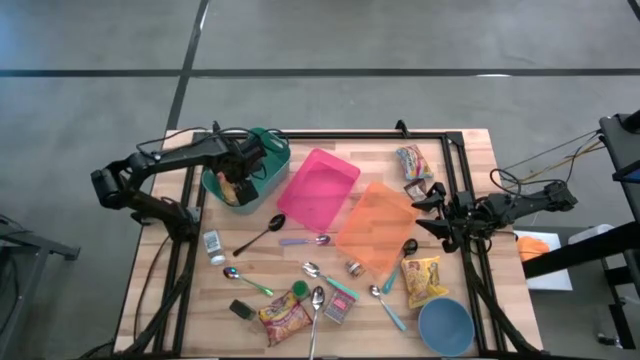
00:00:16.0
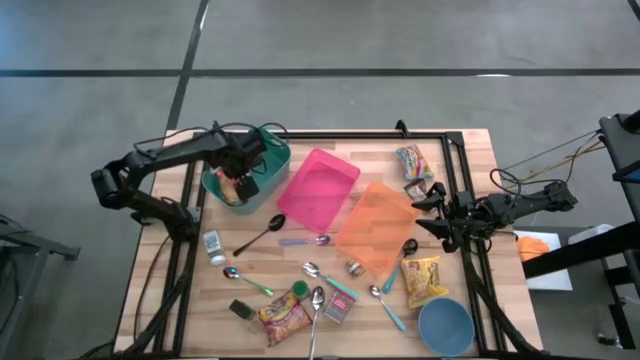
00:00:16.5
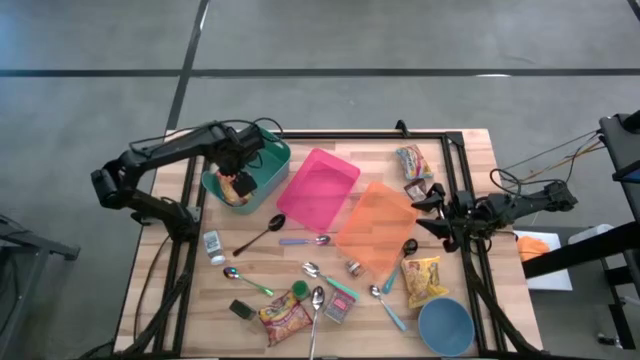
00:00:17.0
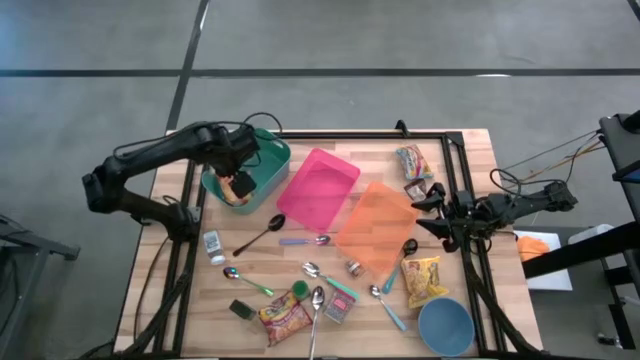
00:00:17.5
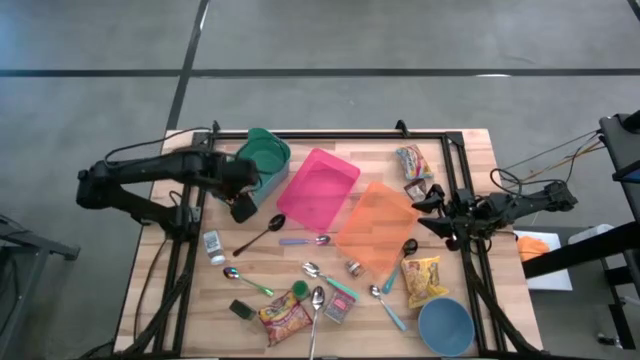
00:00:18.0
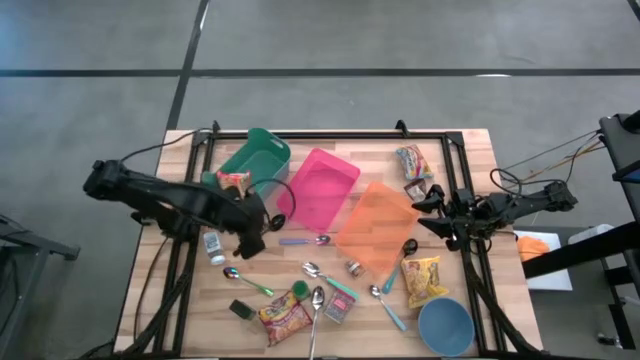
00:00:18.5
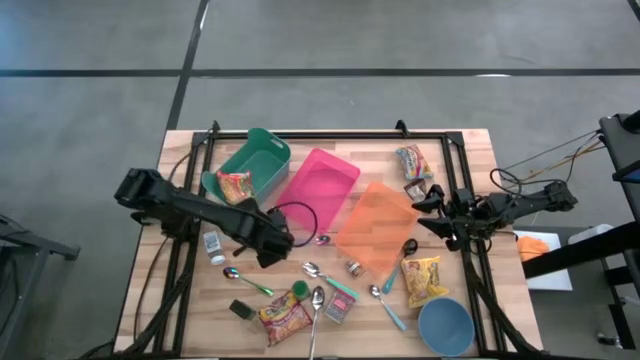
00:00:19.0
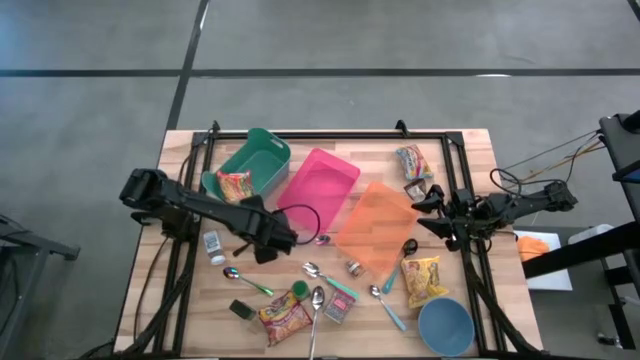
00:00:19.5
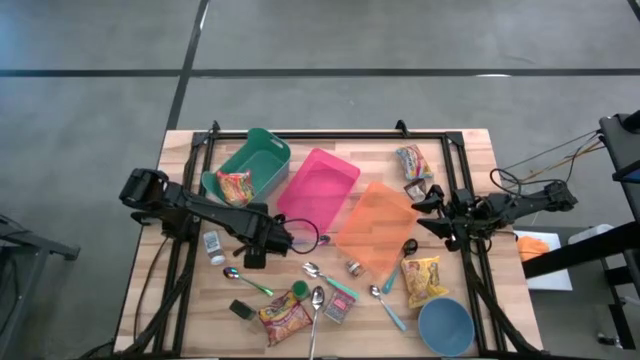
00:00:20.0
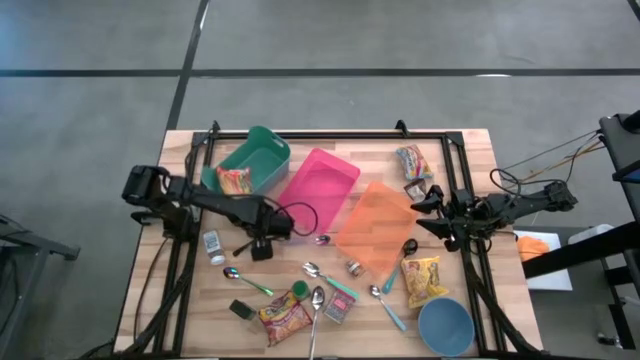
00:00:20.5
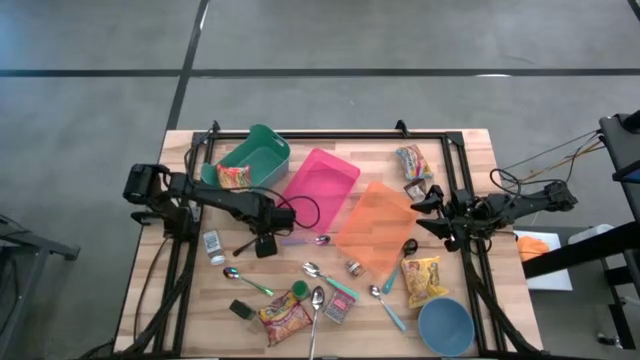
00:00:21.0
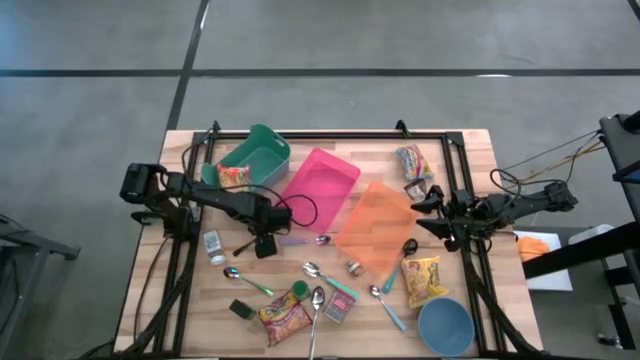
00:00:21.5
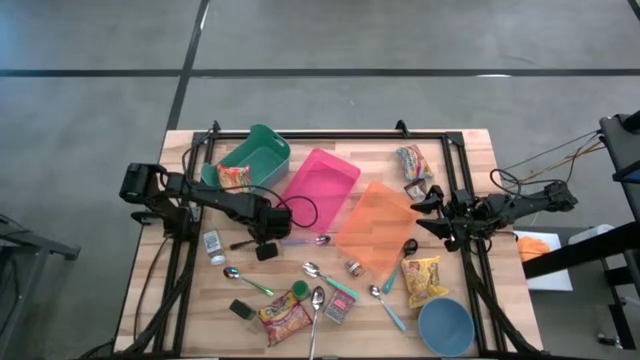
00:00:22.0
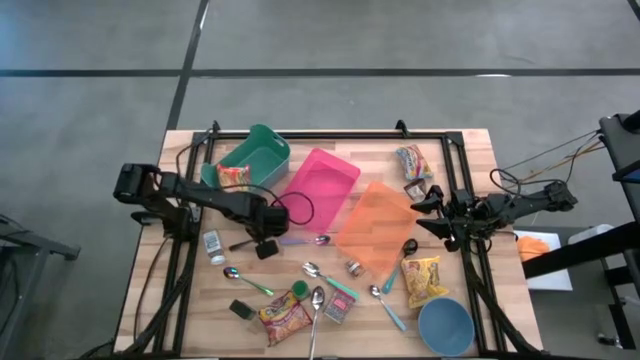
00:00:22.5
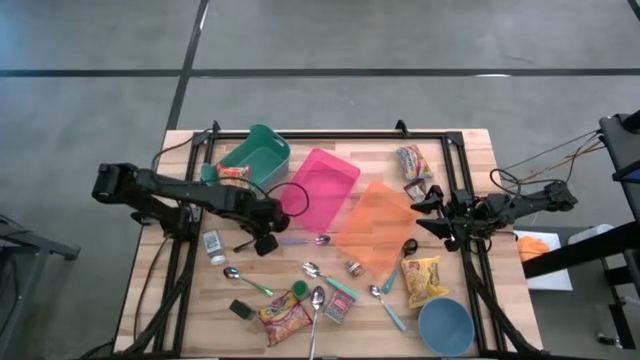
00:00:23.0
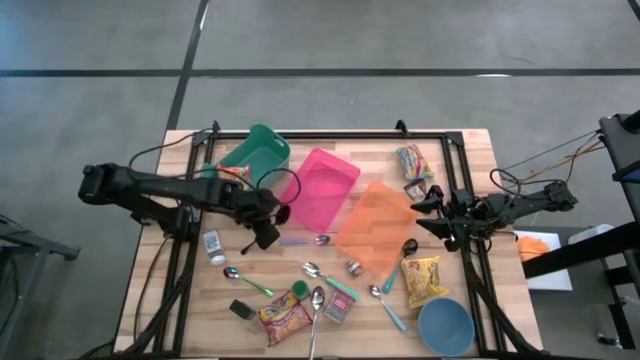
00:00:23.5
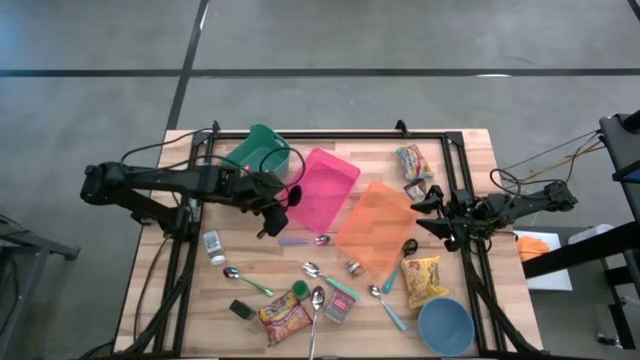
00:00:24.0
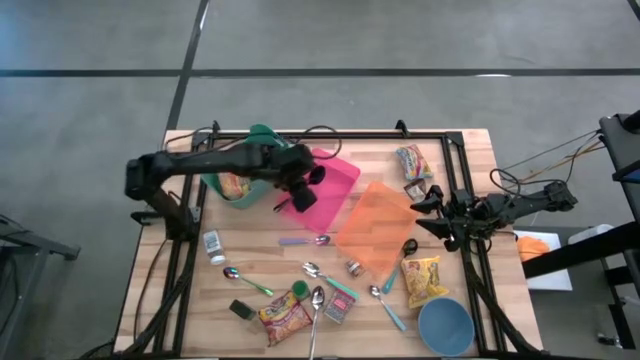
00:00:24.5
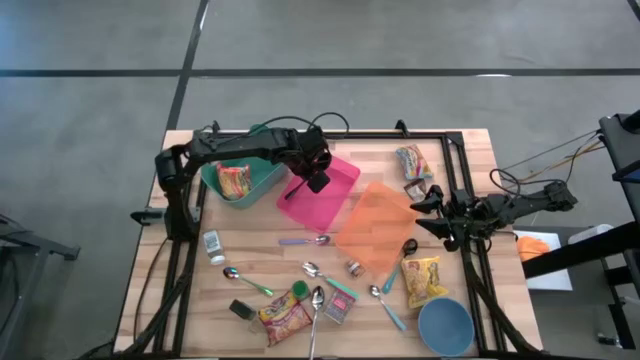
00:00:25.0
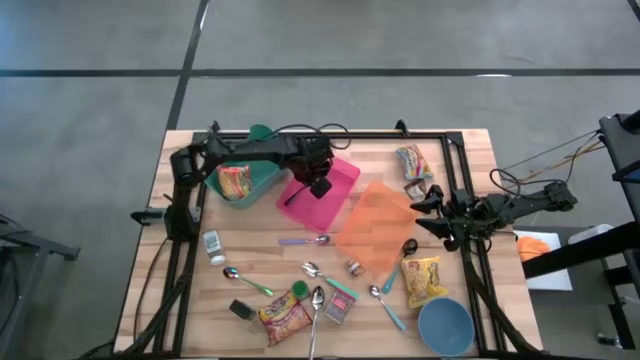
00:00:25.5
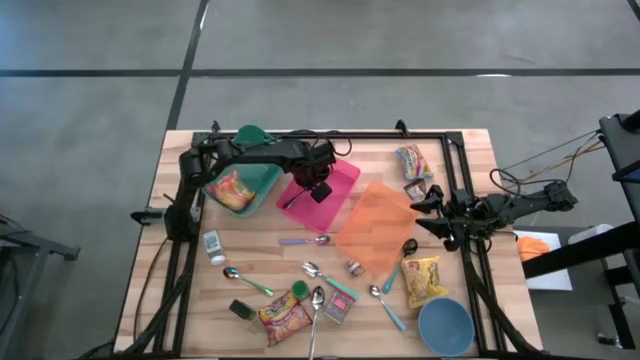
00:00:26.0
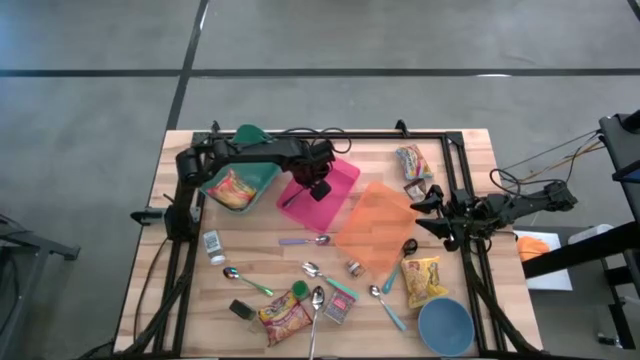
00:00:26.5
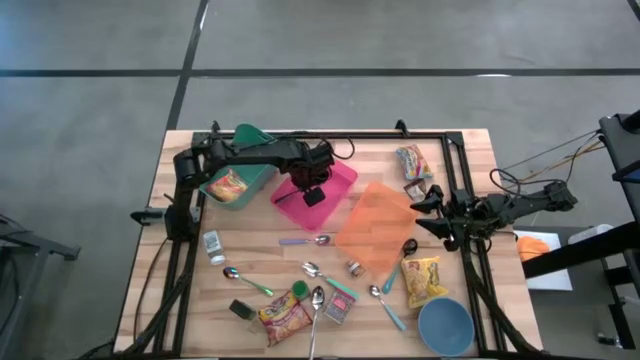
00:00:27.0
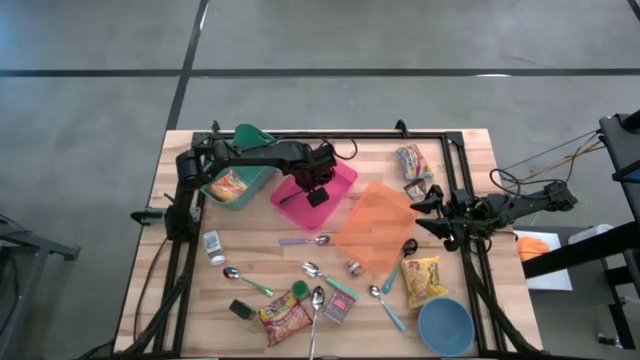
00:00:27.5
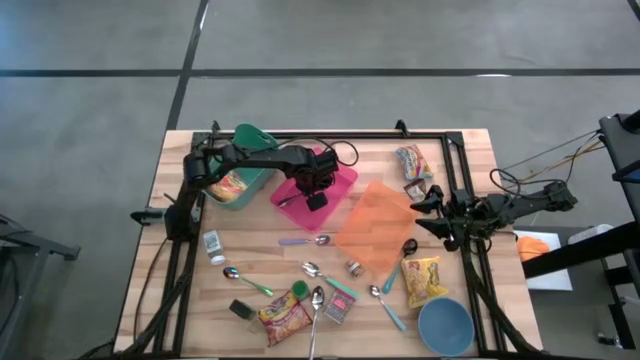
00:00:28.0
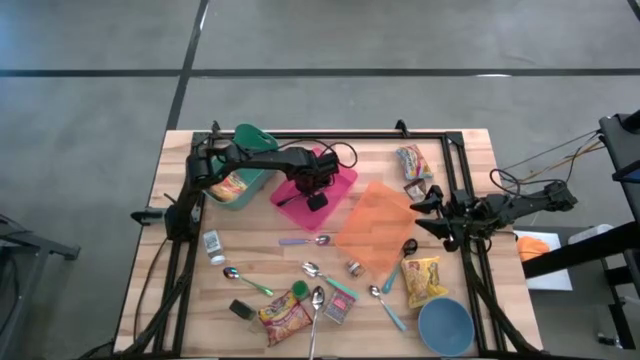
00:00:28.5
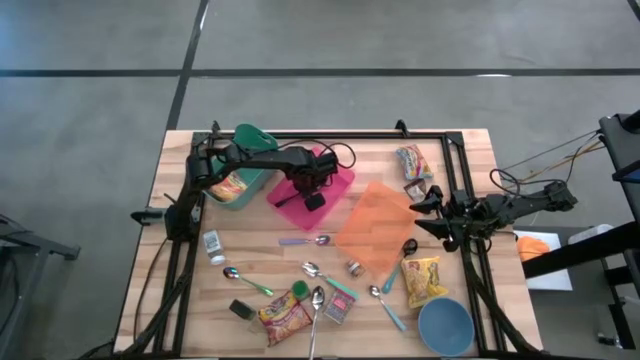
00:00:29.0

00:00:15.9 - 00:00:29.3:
Put the black spoon into the pink bin

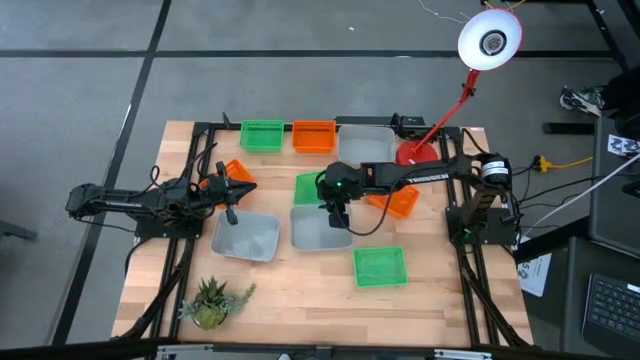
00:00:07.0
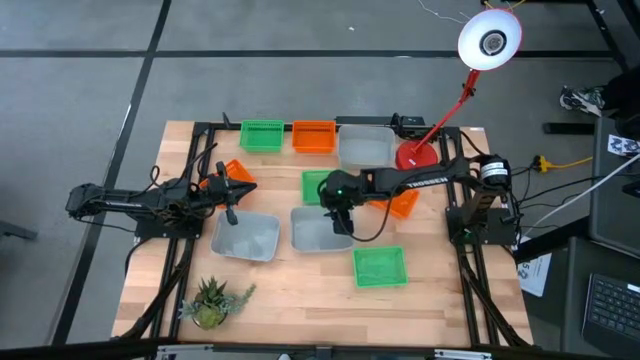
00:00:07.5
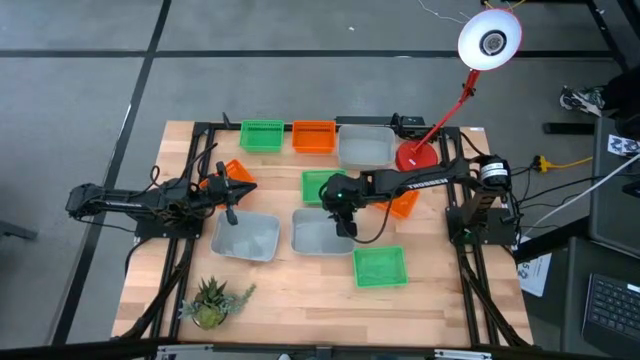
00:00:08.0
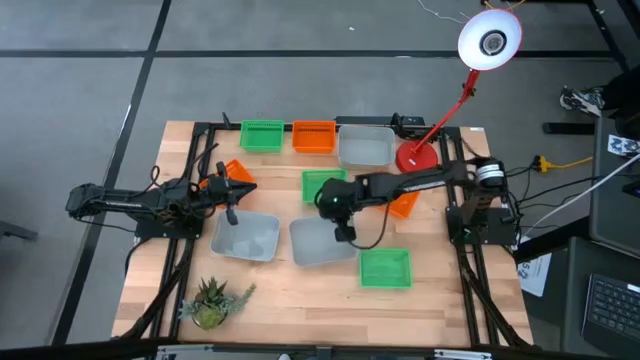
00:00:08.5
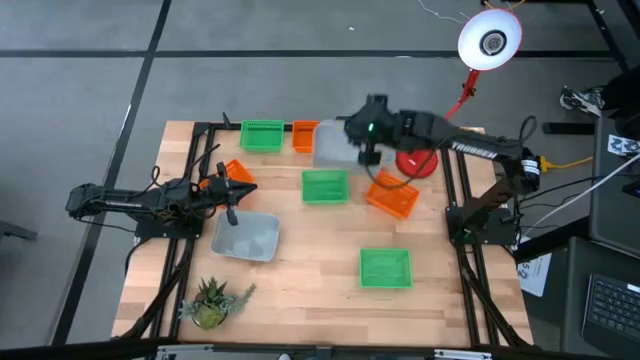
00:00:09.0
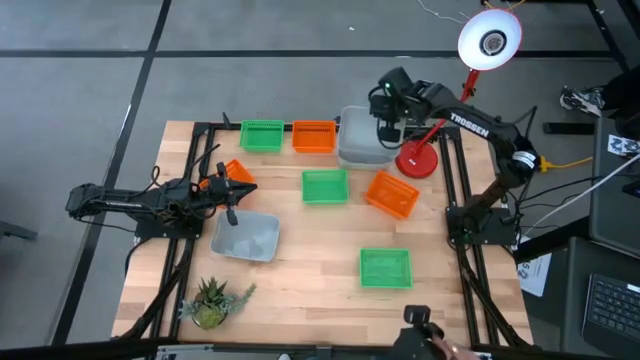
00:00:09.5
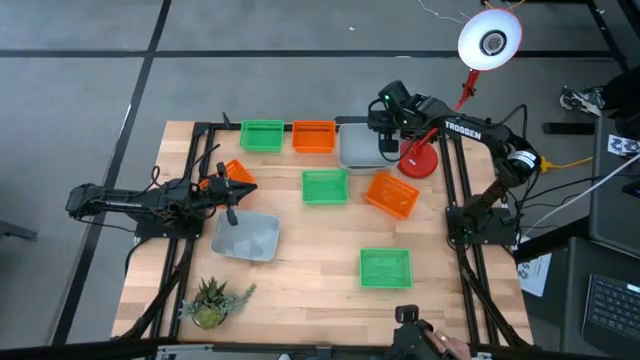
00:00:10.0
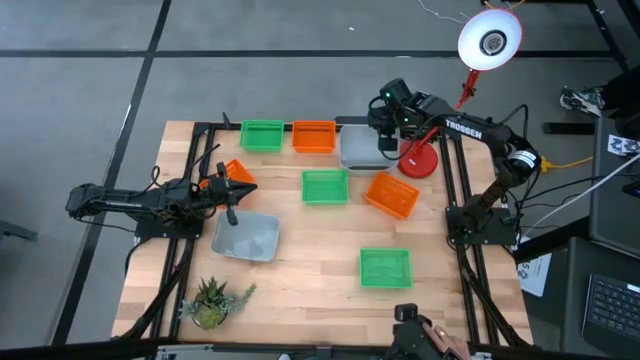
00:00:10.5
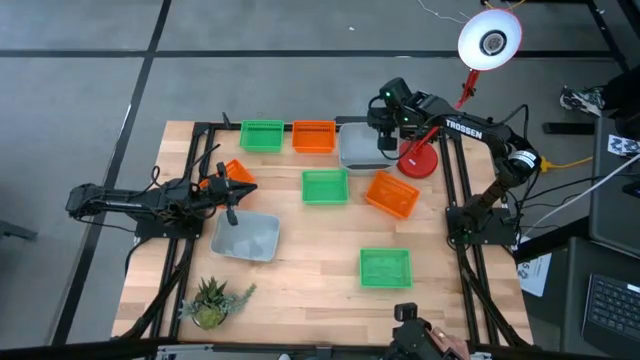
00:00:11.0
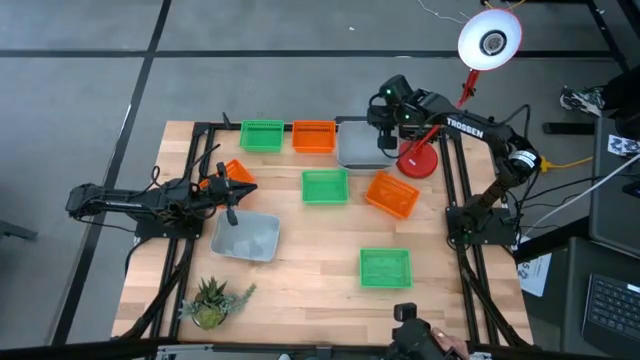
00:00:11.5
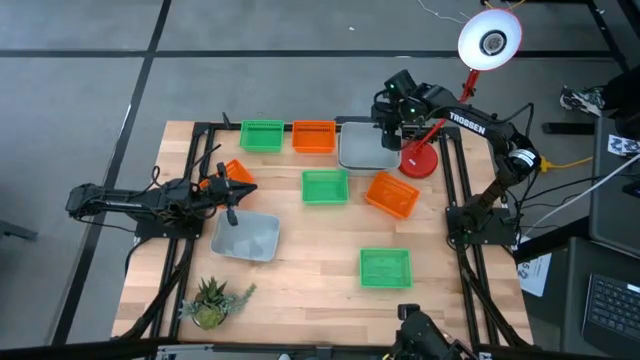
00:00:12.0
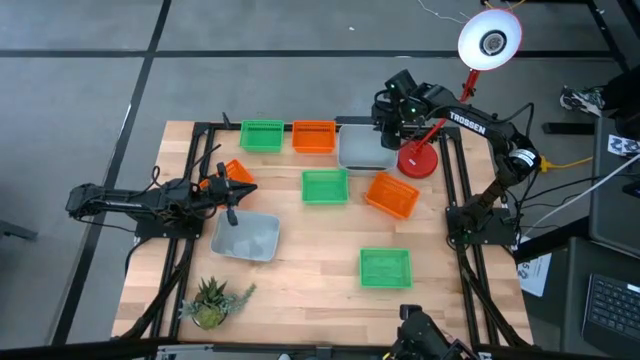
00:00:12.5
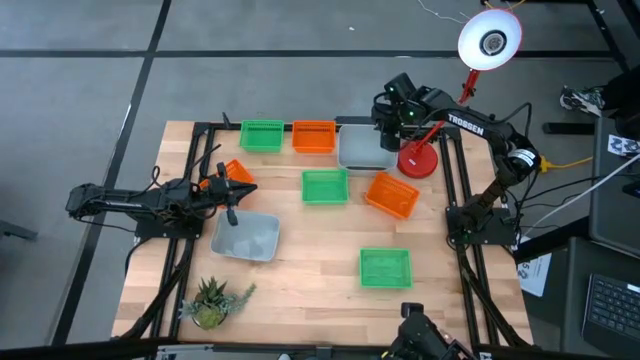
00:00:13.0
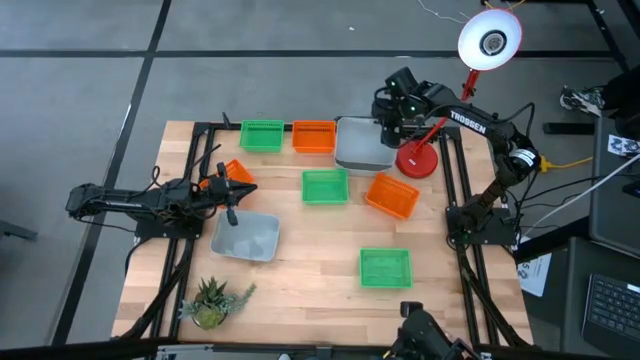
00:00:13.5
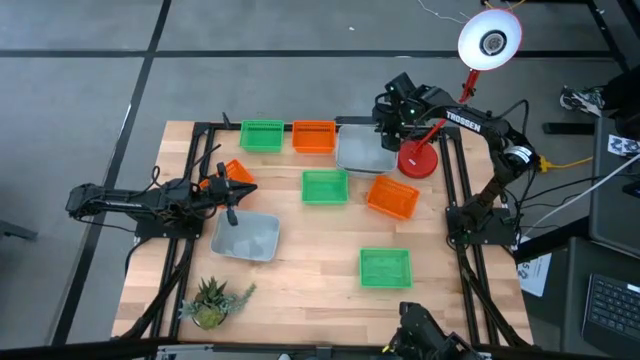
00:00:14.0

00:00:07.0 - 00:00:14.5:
Stack the bottom right gray bin on top of the top gray bin
